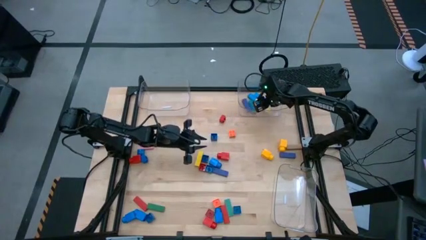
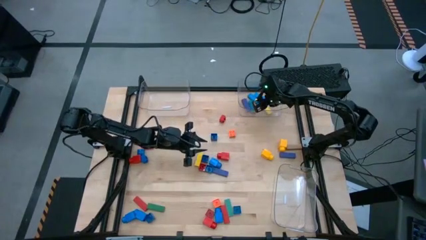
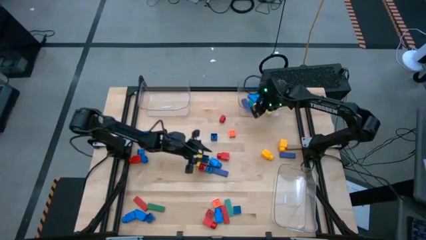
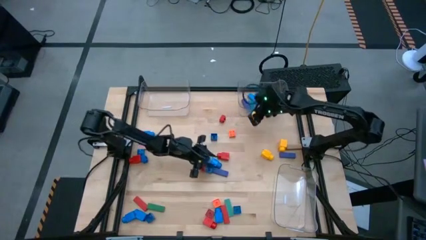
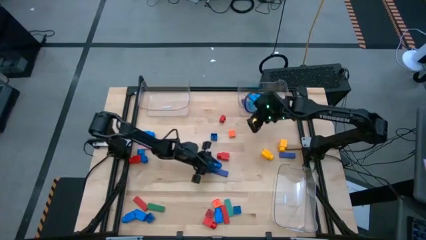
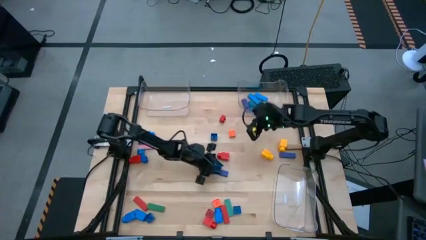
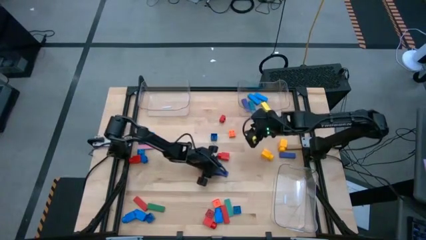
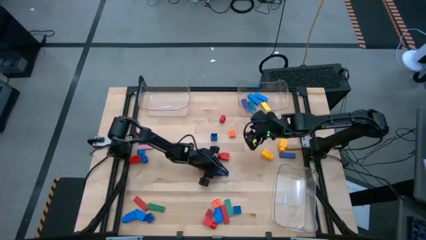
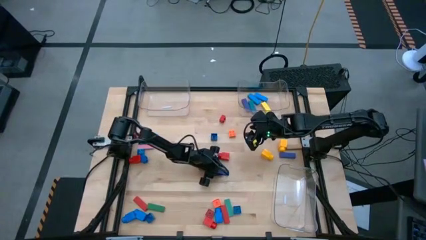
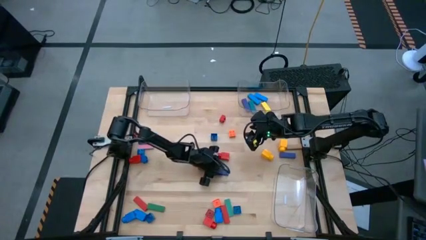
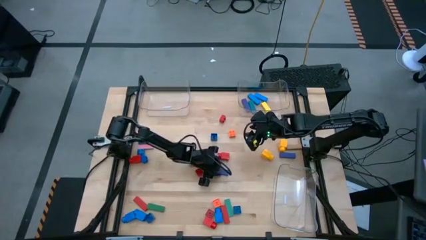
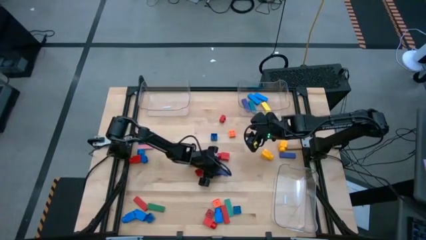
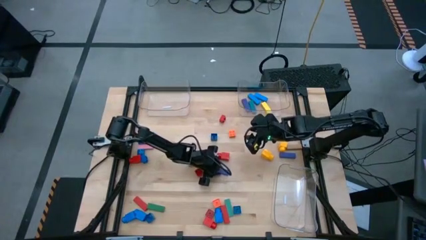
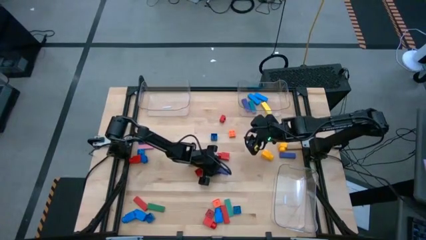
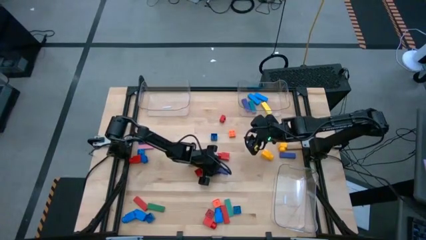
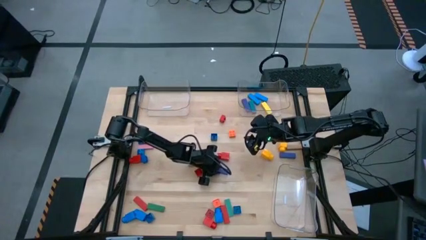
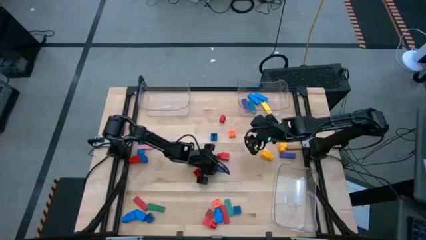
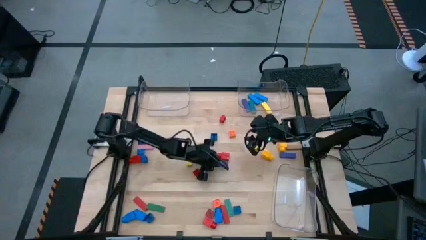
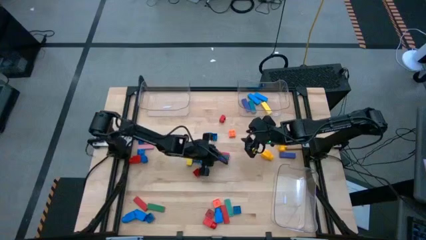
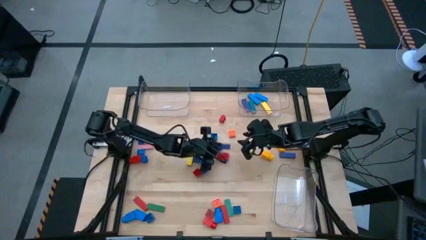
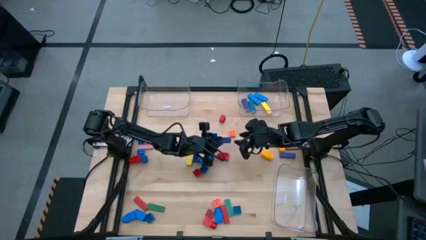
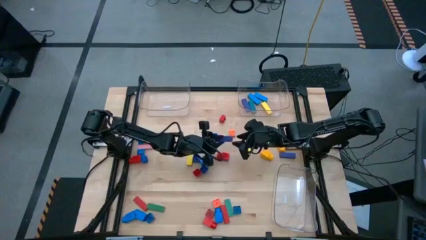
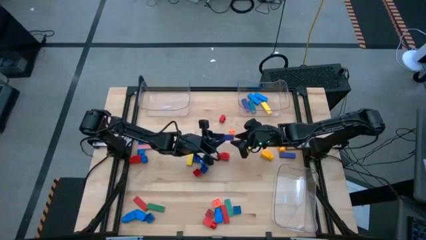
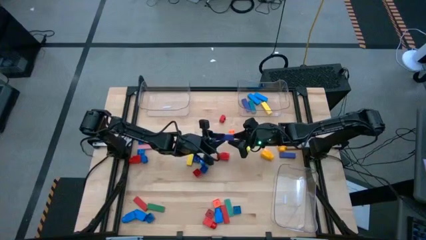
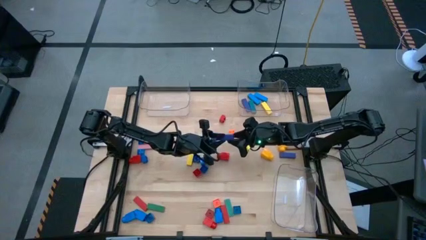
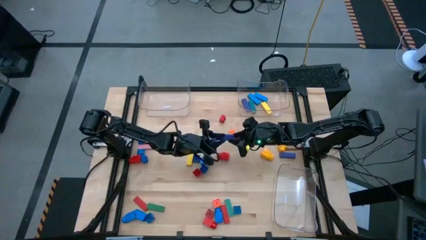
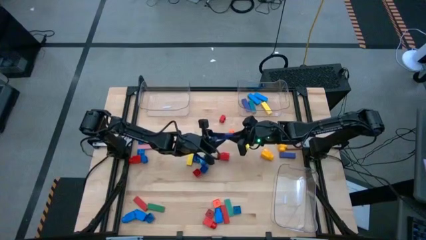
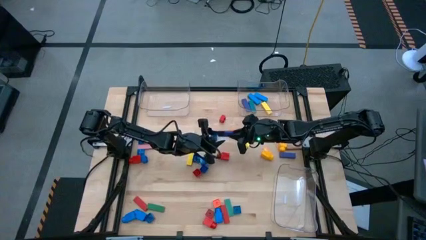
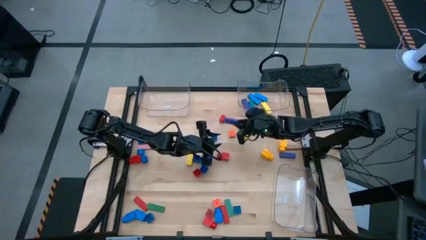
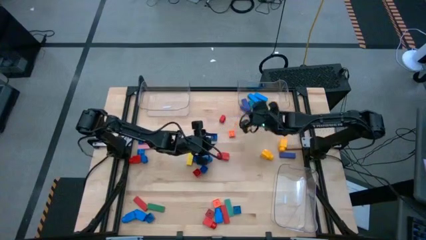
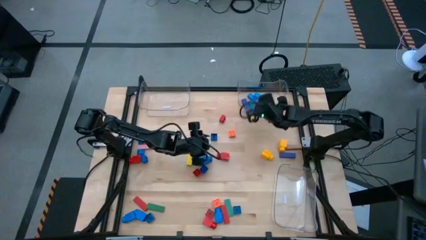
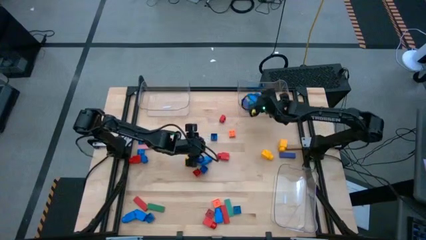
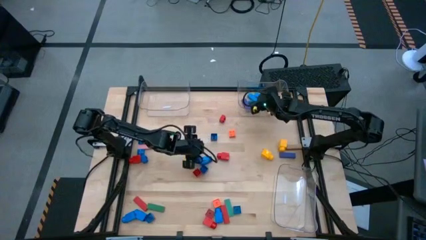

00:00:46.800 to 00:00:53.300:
Task: Sort blocks by size
Put the dark blue block into the top right transparent bin

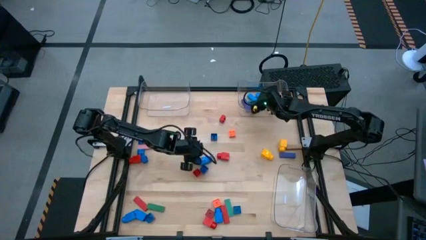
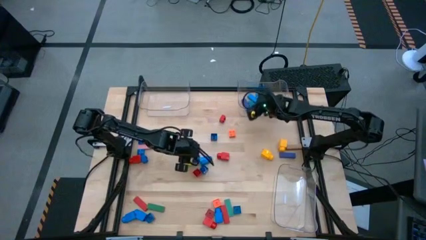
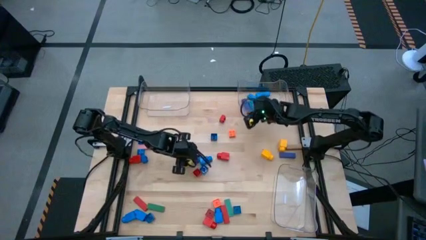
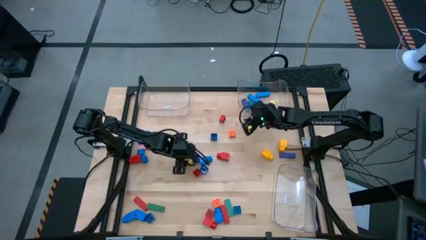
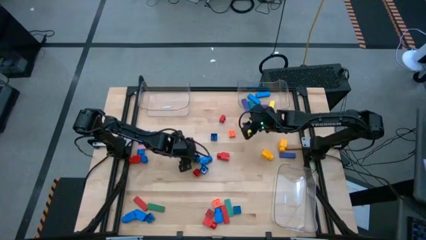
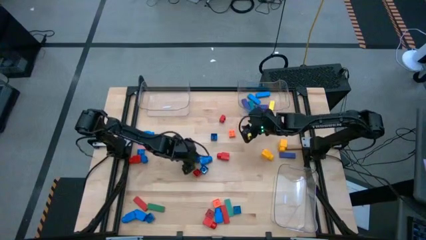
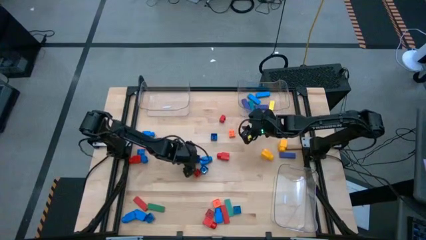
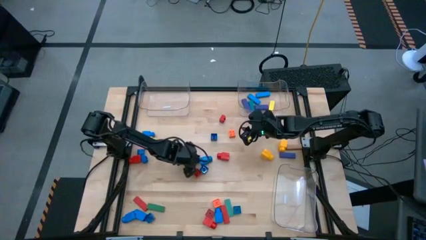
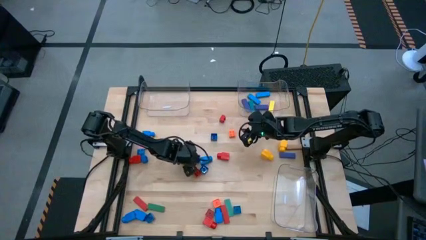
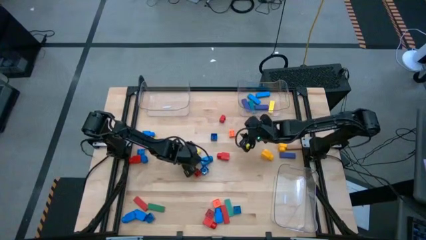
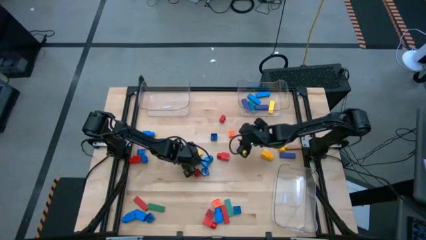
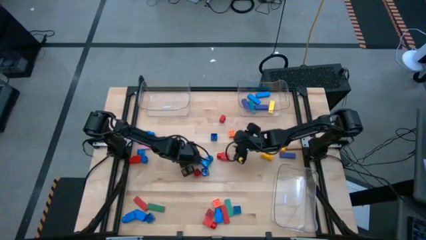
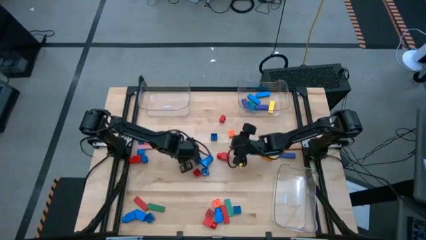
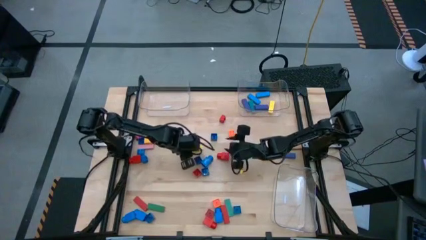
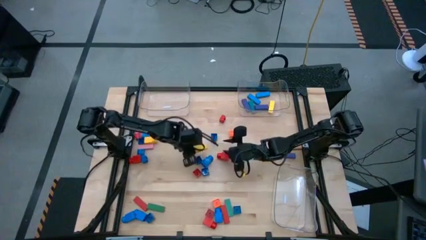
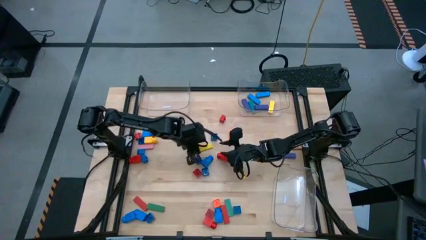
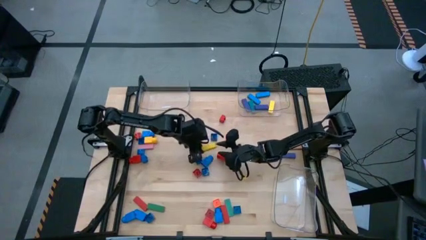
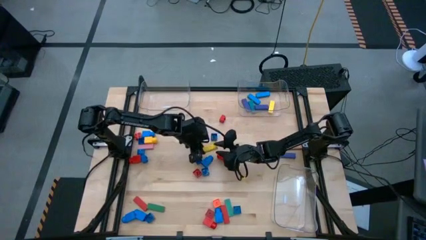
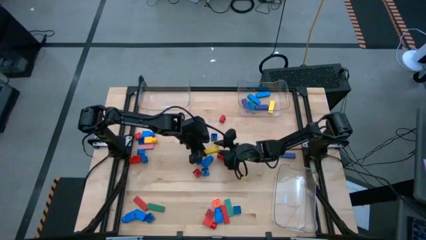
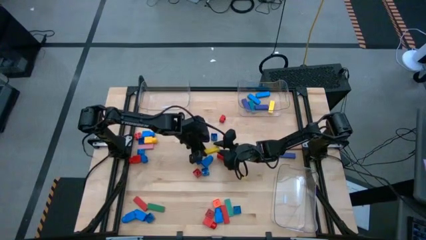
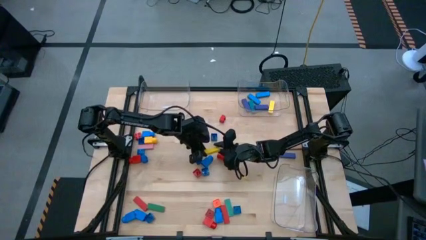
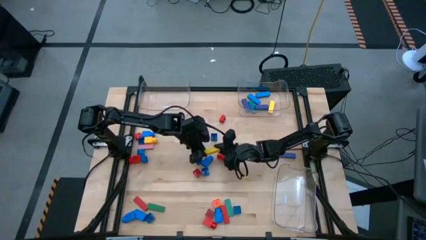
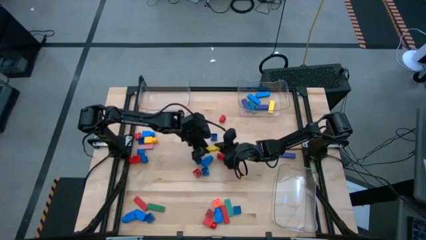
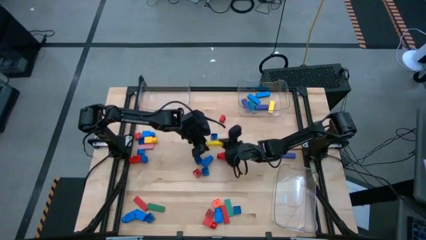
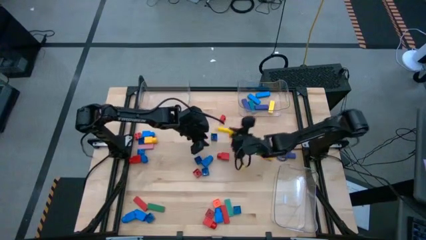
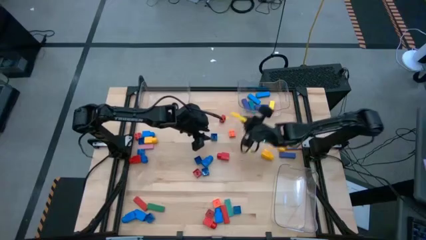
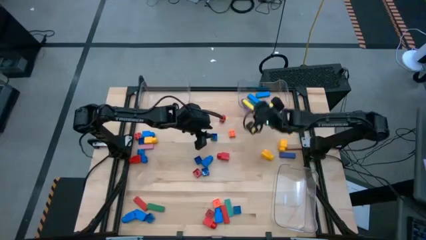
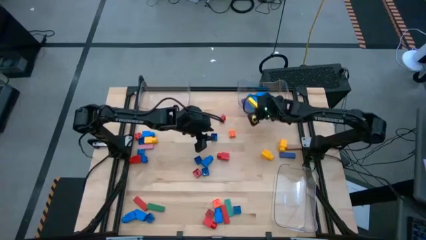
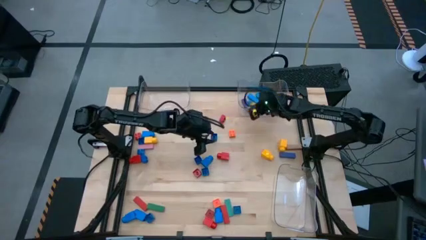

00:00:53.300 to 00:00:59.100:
Put the yellow block into the top right transparent bin

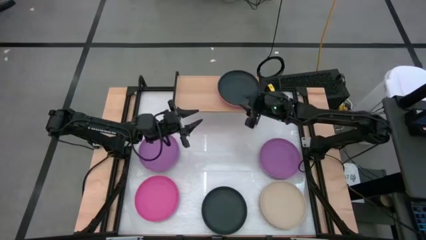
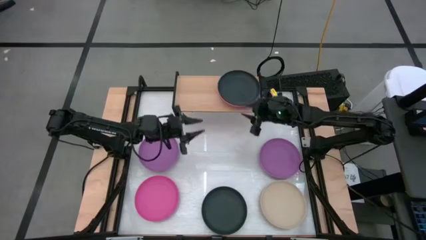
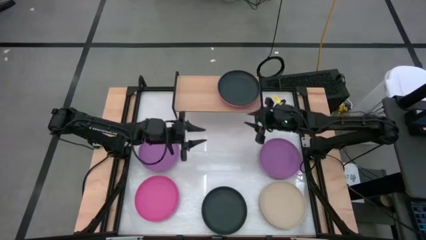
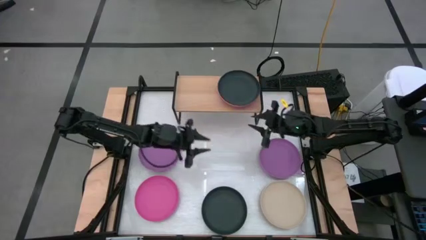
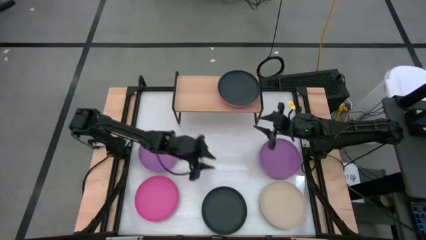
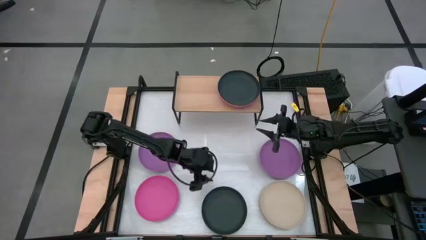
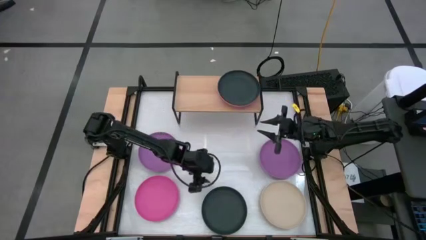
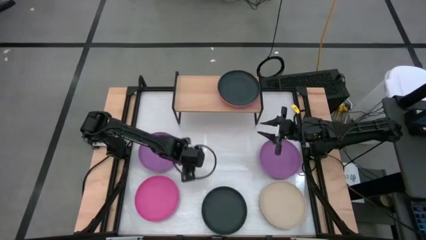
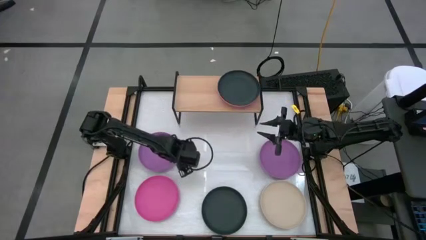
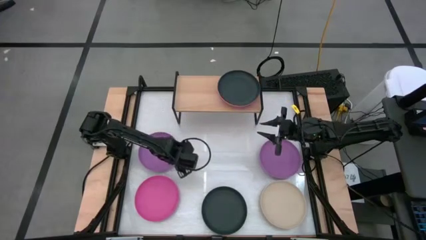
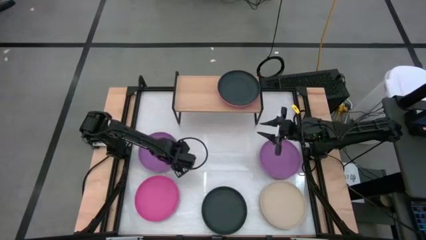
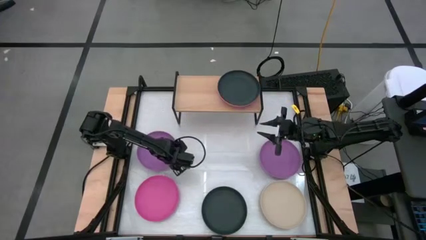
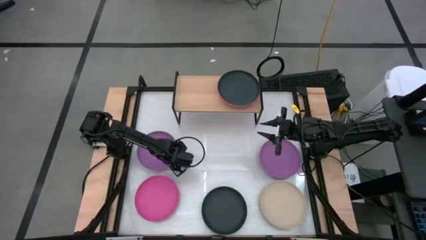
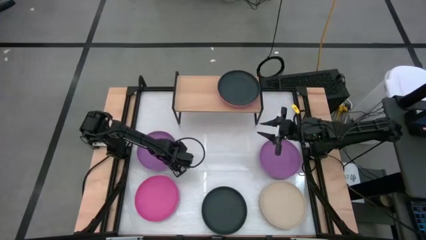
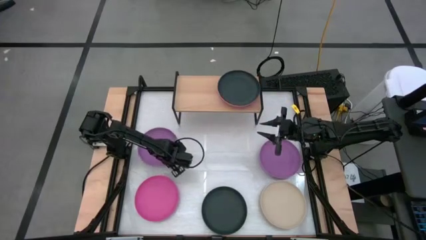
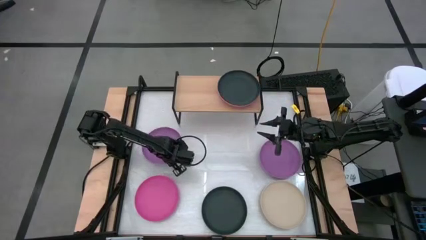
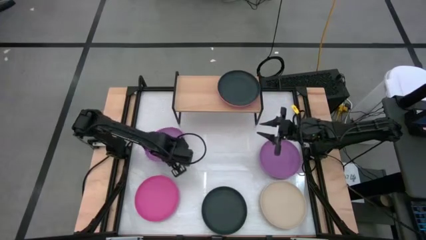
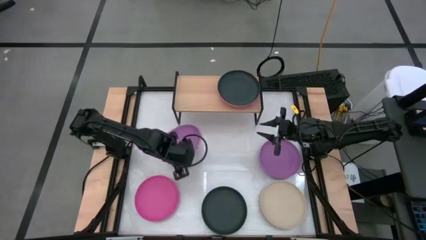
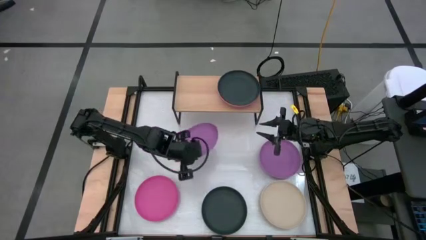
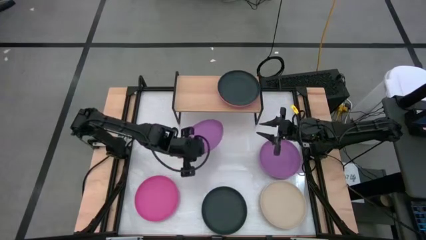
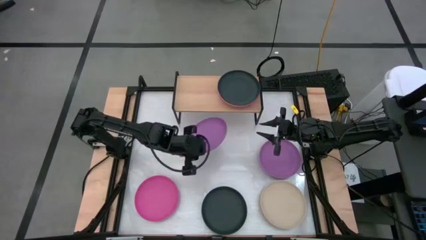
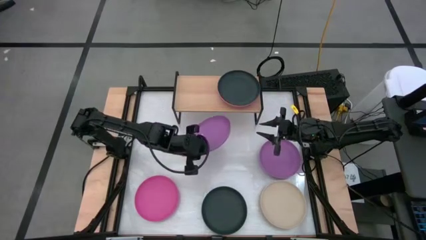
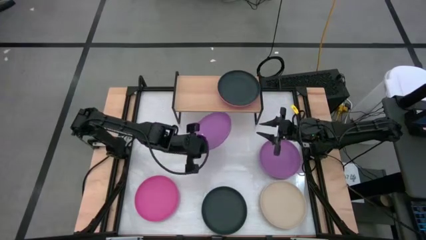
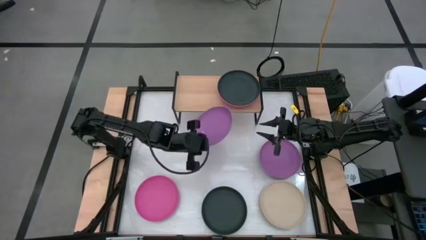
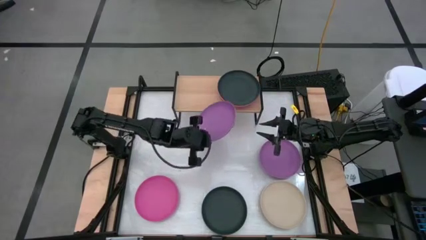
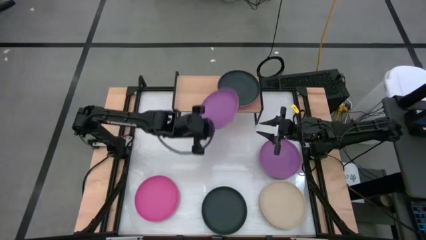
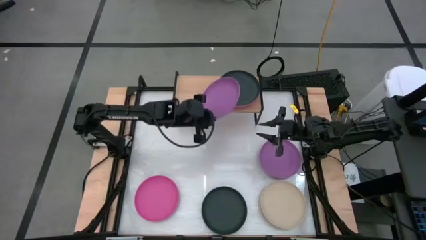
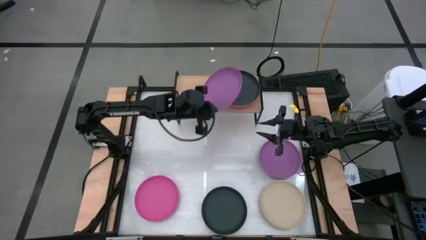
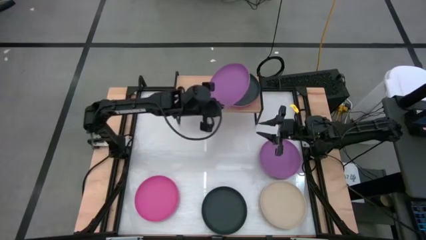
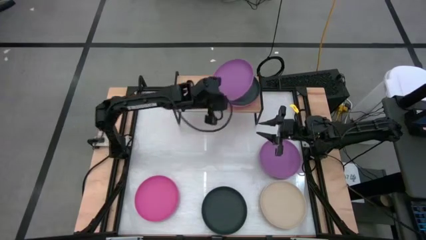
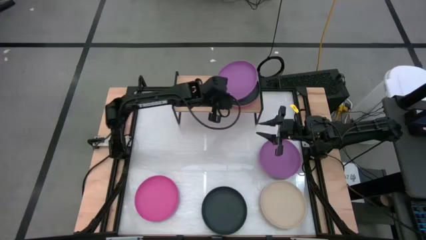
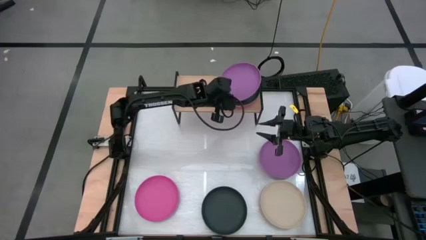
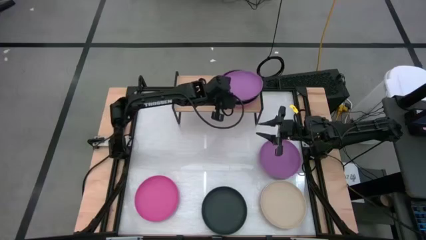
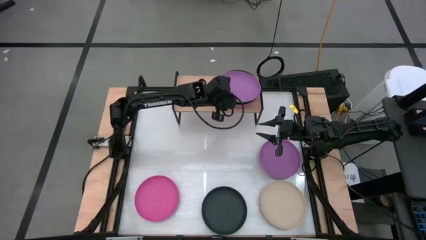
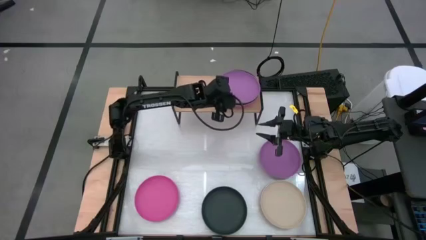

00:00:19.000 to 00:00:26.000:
Task: Place and stack plates onto a shelf
Stack the left purple plate on top of the black plate on the shelf
